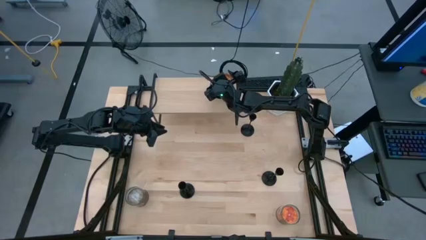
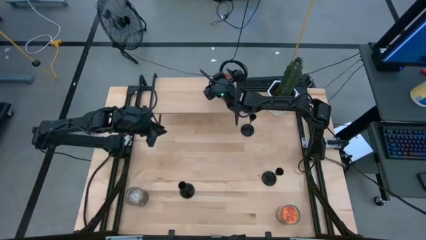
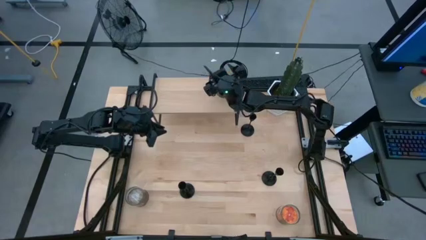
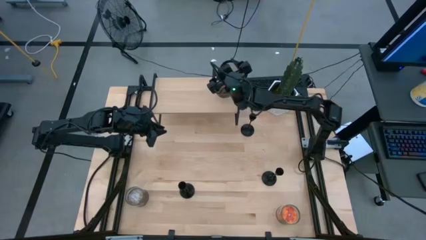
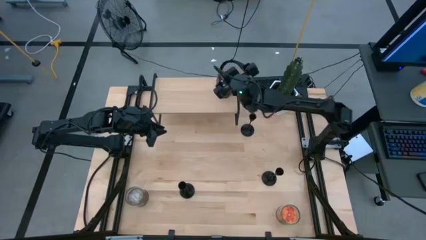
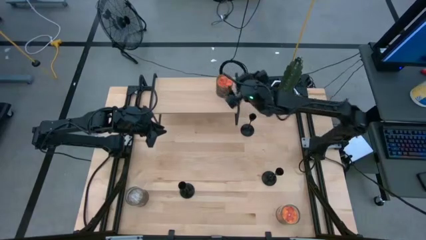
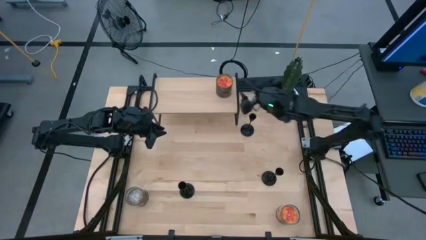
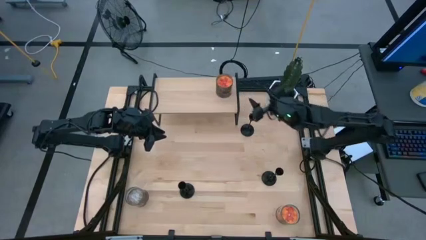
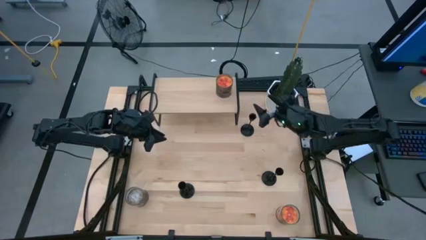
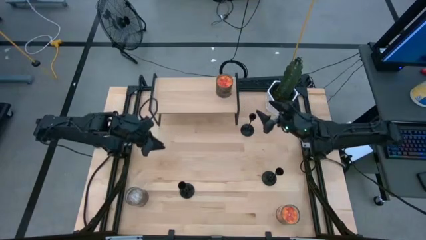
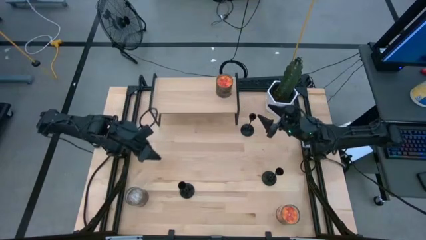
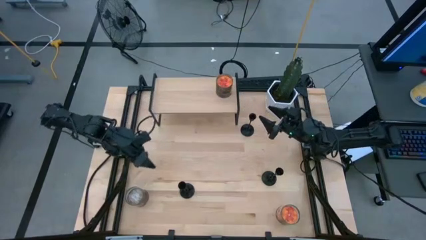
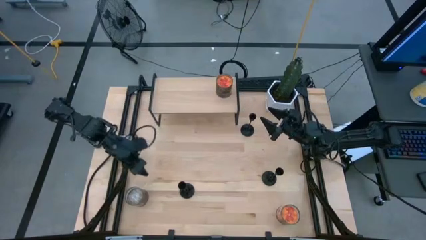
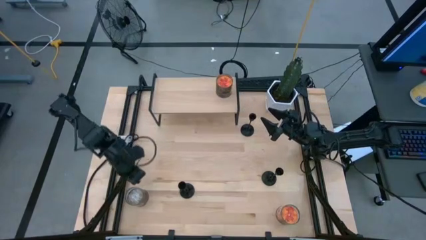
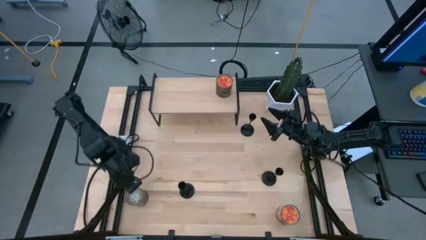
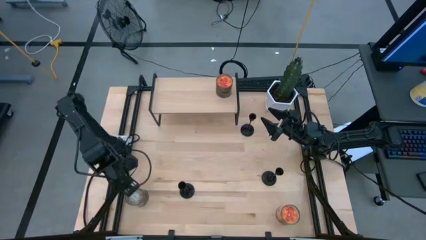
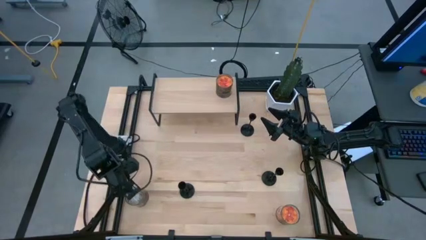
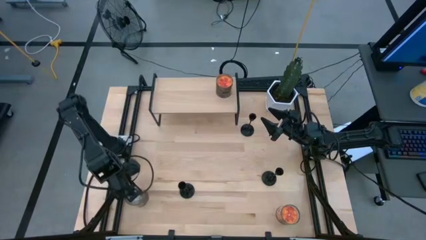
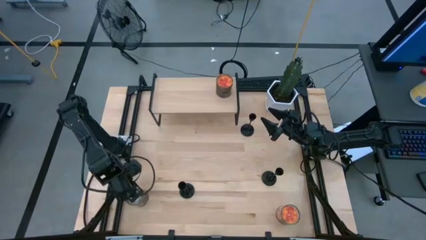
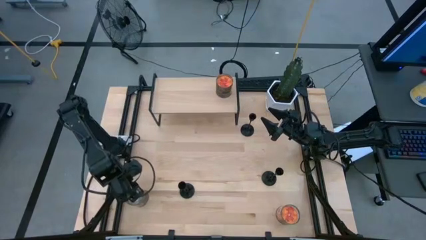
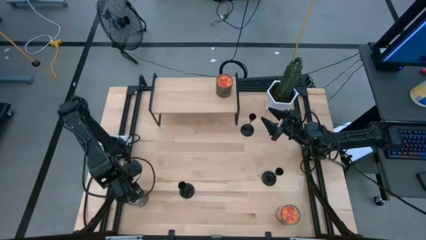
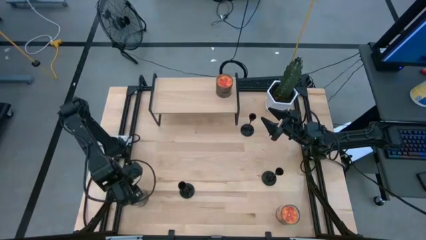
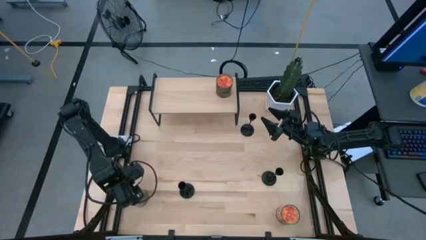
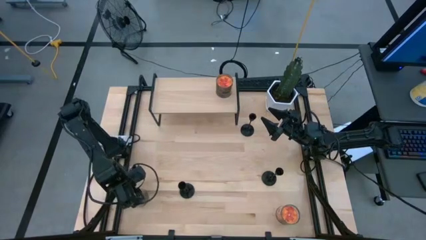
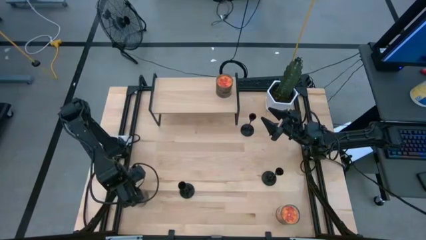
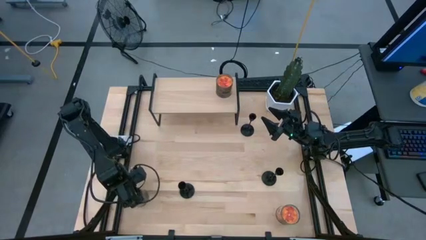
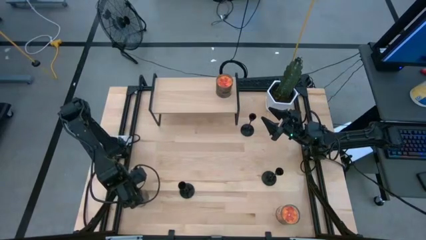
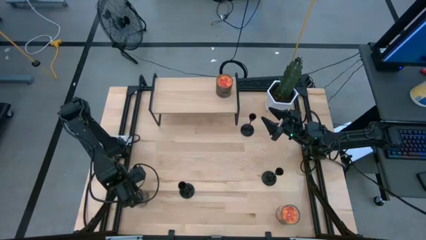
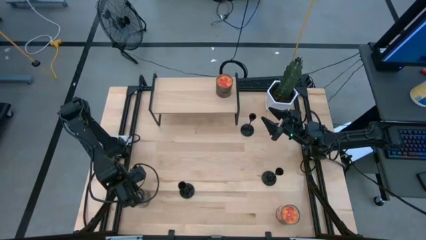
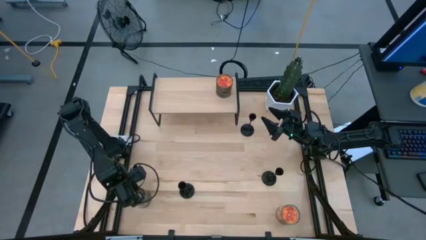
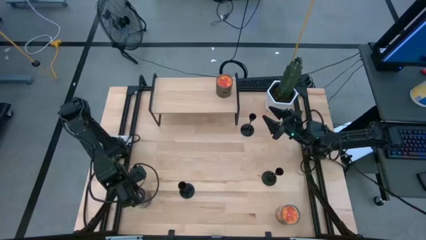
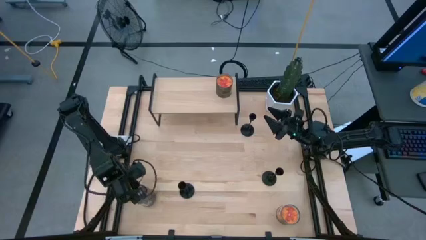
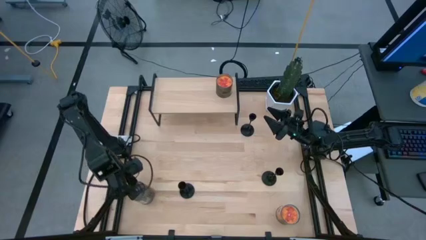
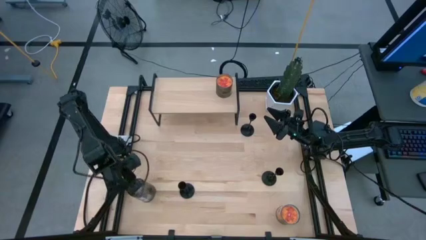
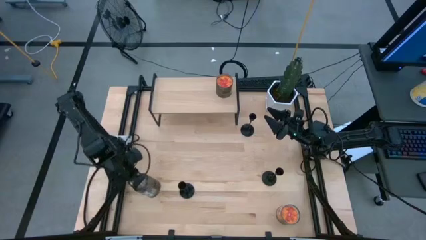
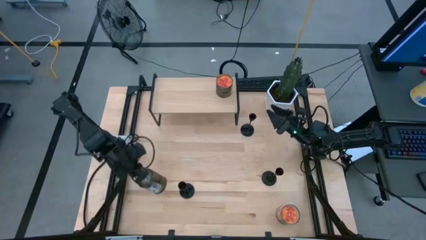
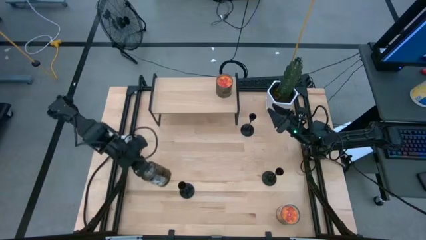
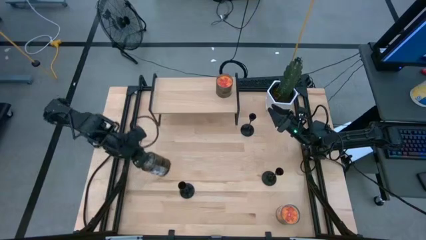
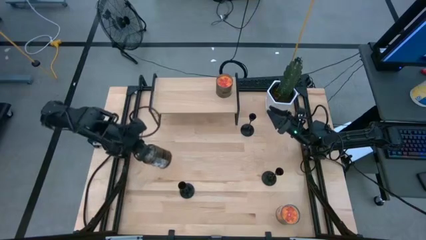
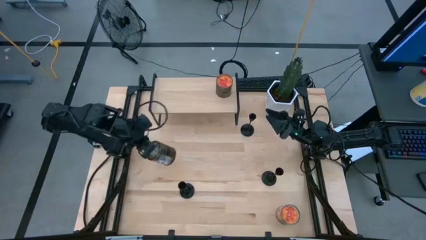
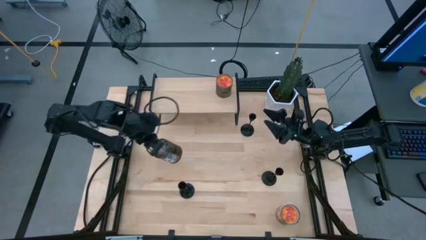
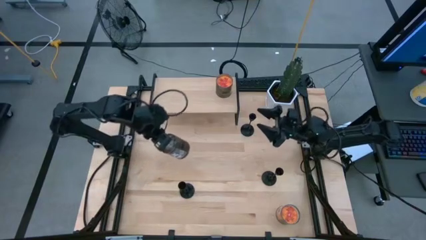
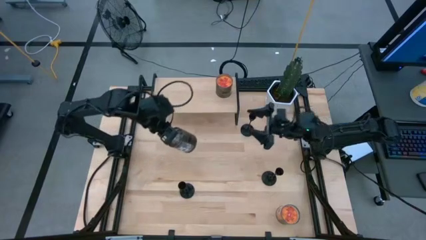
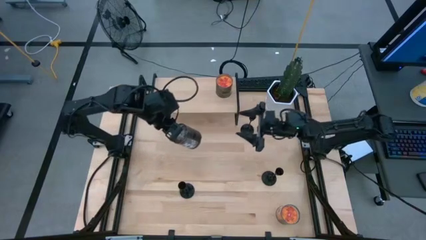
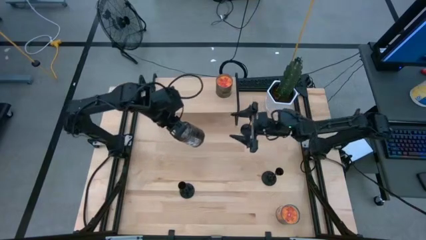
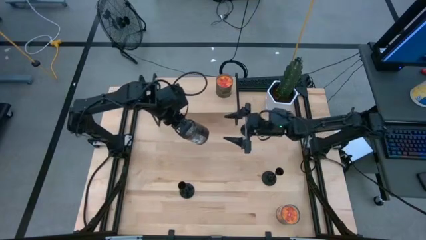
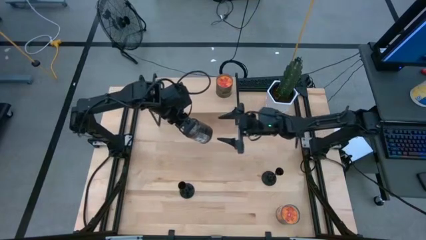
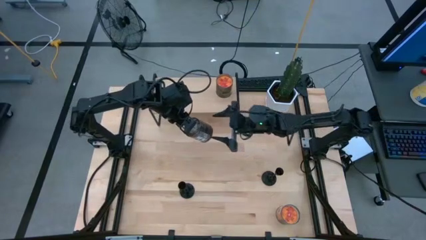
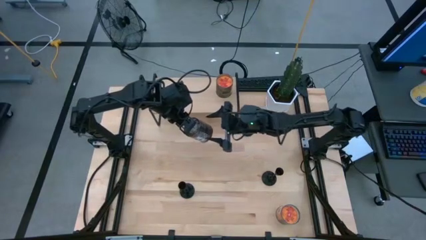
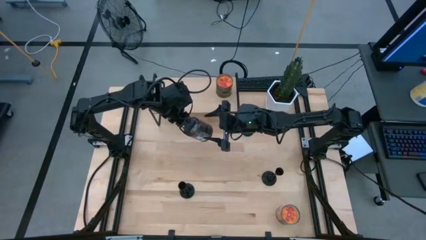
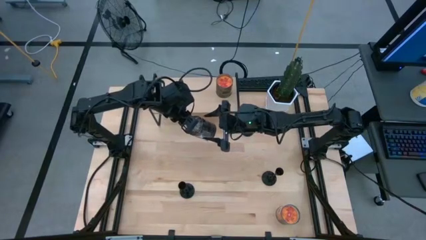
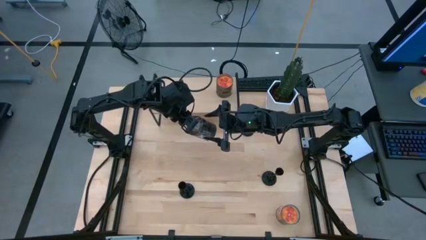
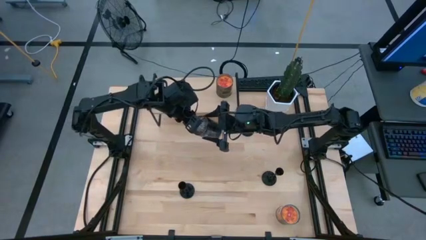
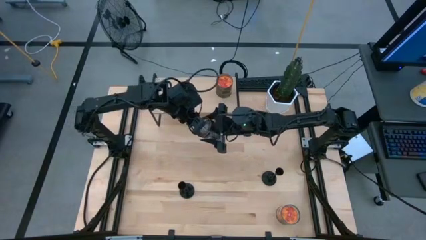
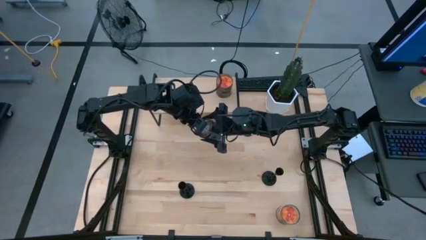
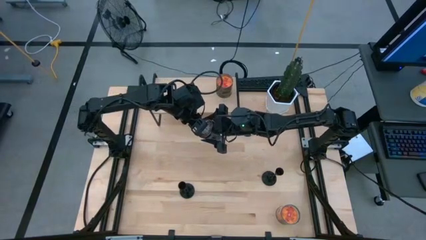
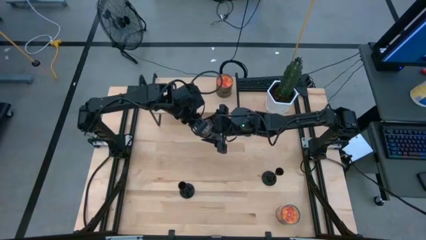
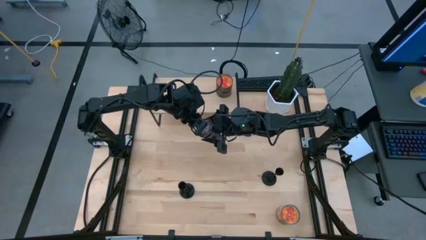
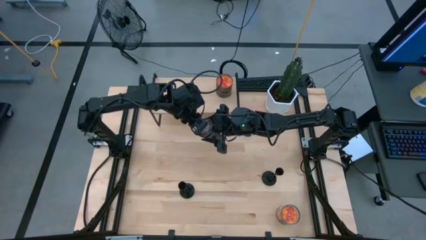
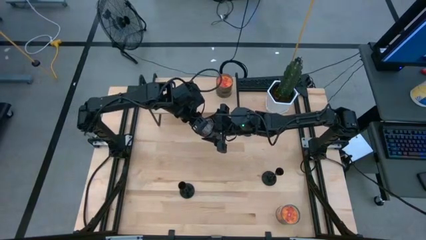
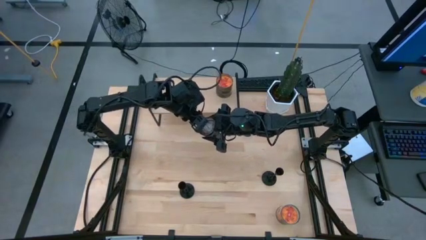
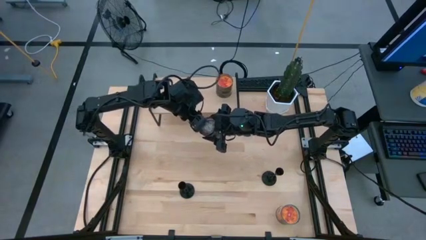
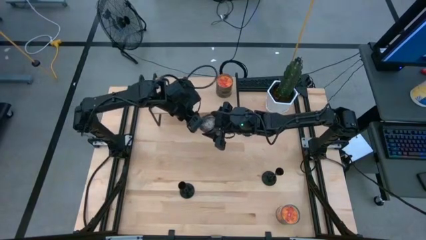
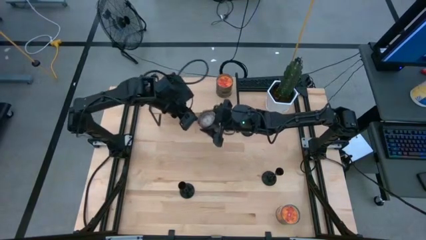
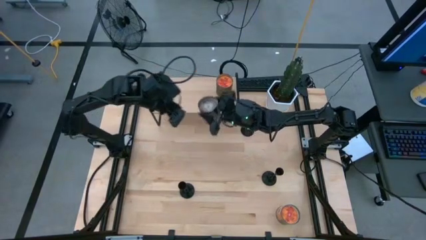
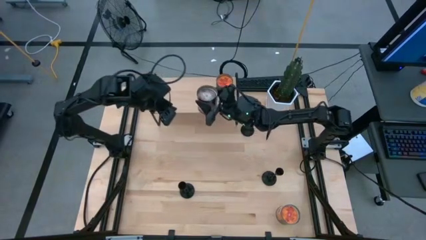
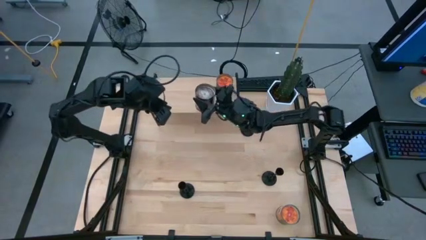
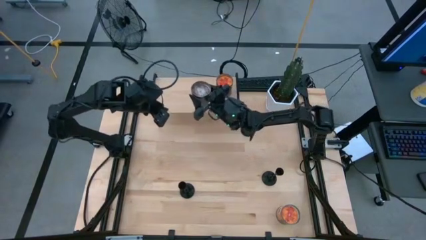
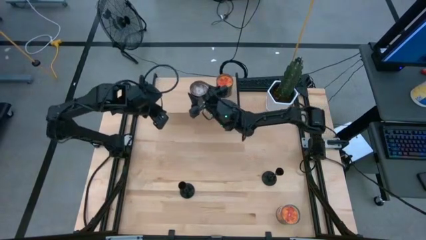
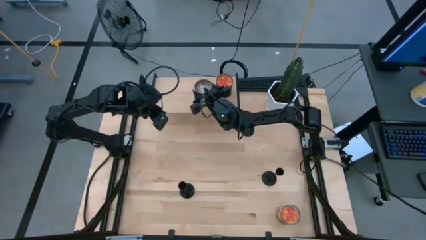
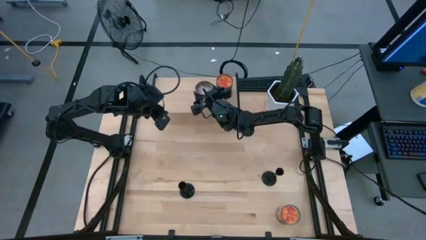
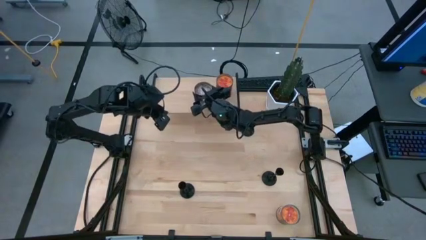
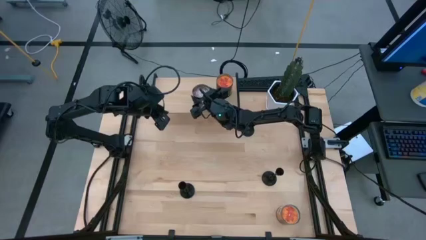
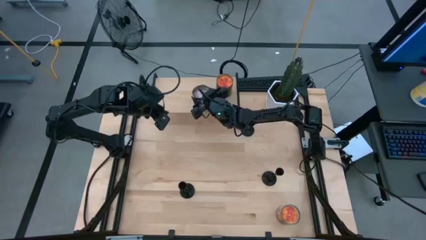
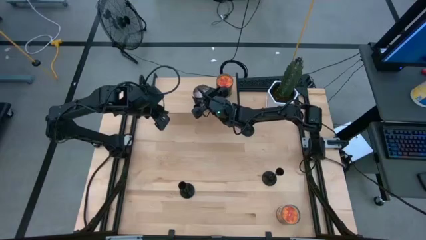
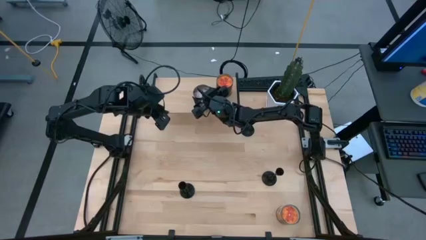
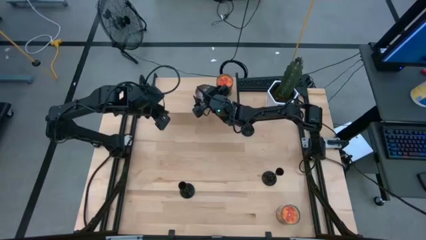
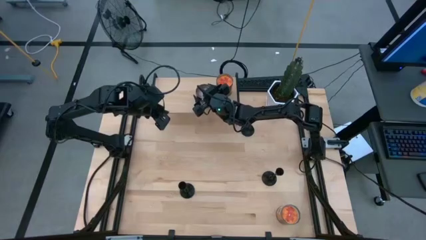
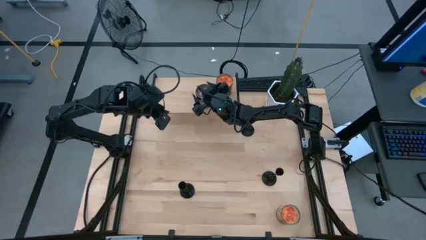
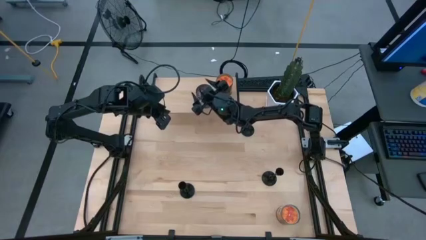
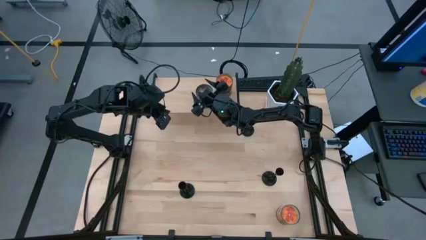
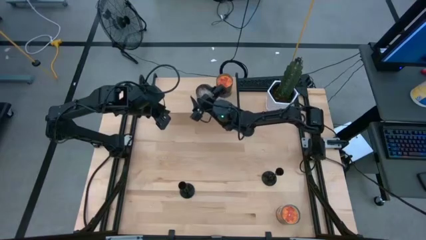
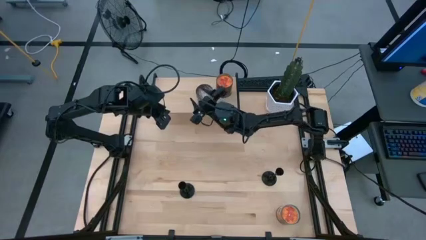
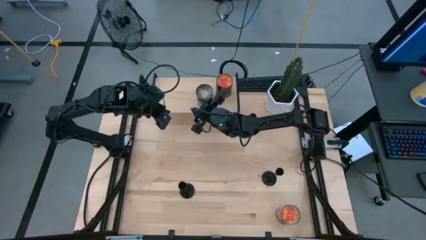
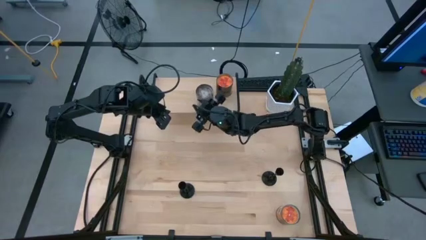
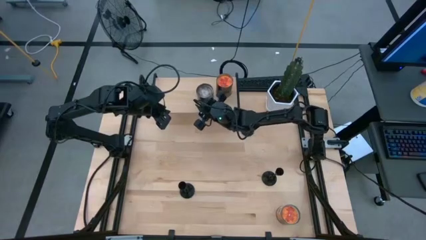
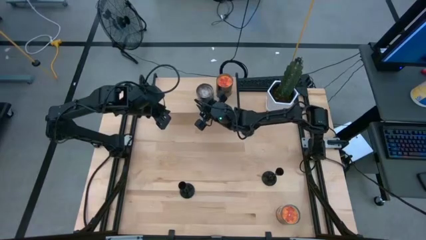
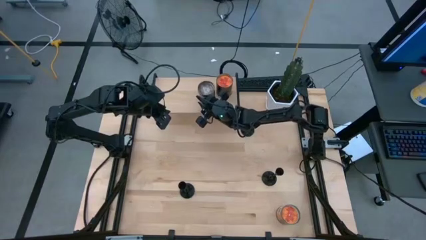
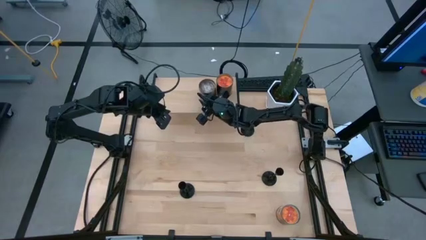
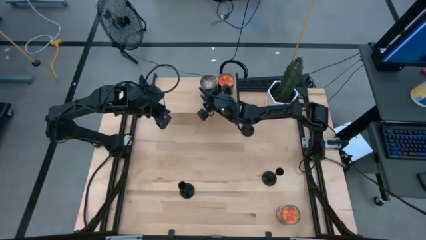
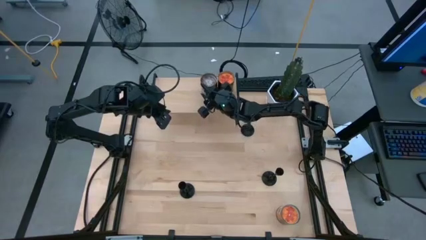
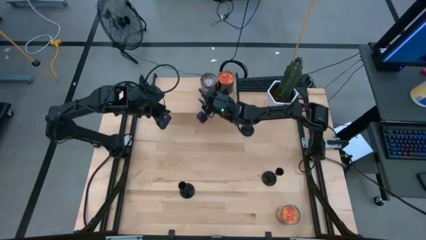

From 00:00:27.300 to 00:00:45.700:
Task: Pick & Place candle stick holders
Put the left silver scented candle on the shelf
